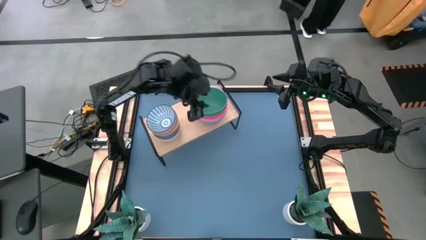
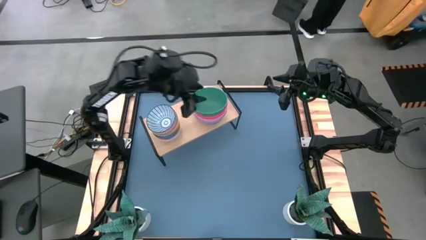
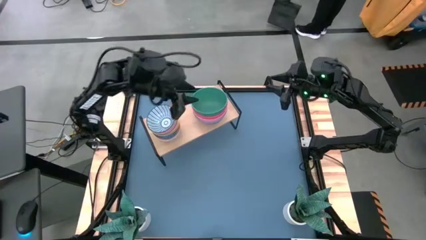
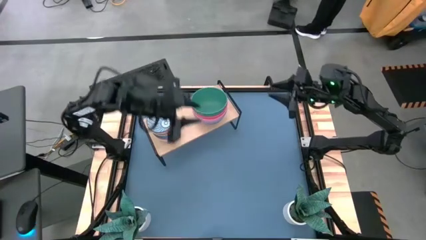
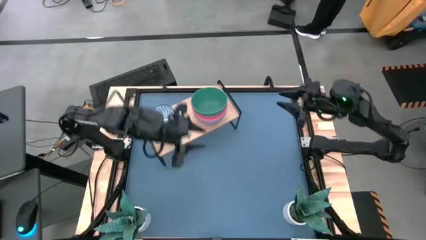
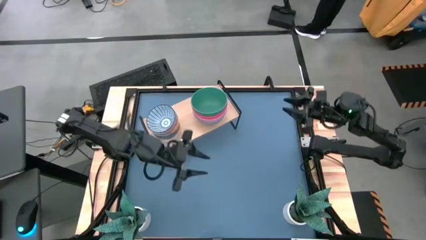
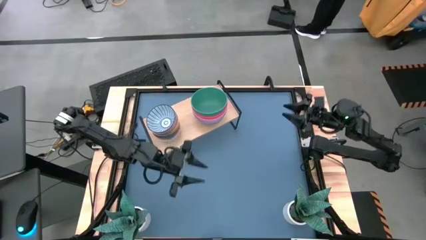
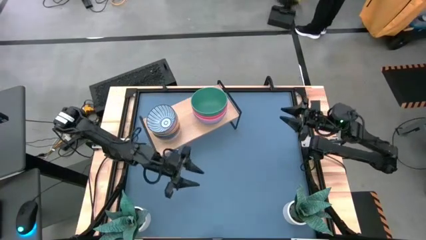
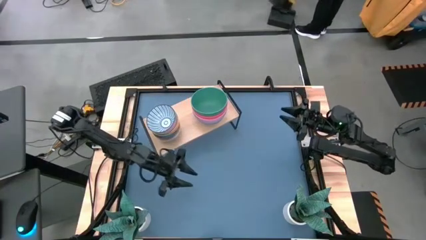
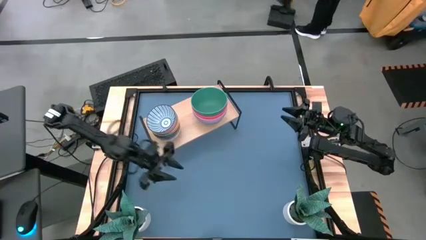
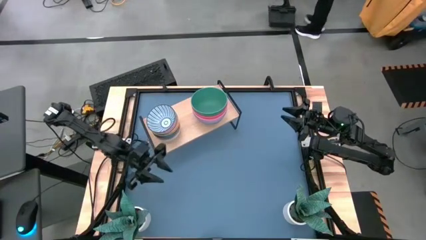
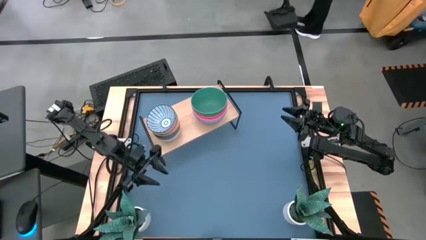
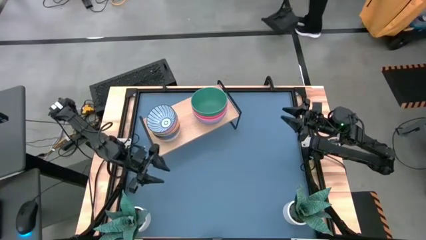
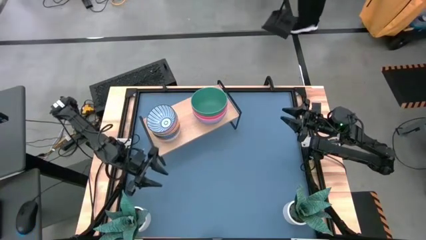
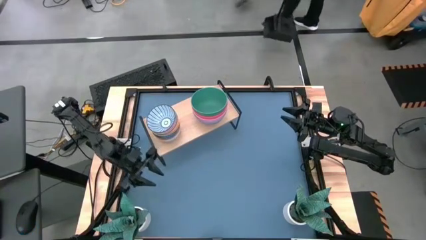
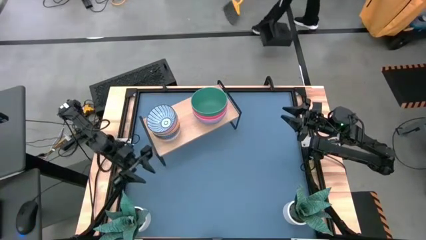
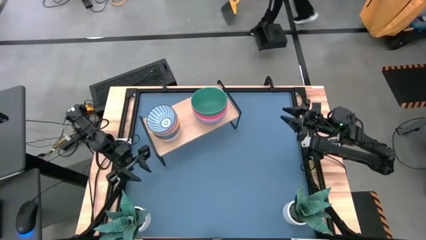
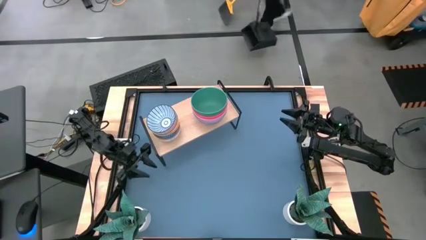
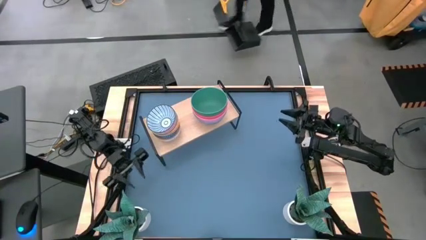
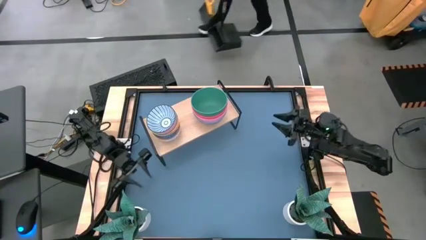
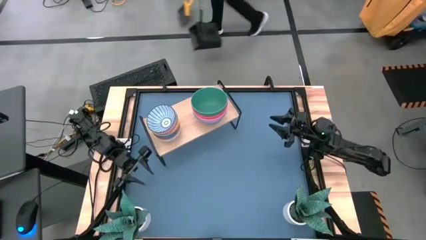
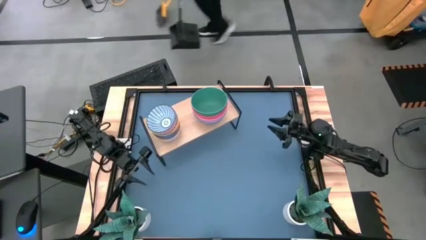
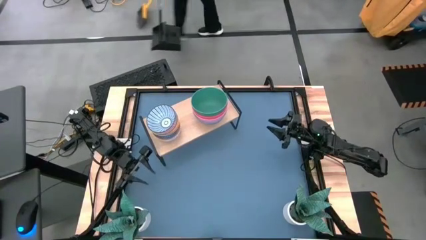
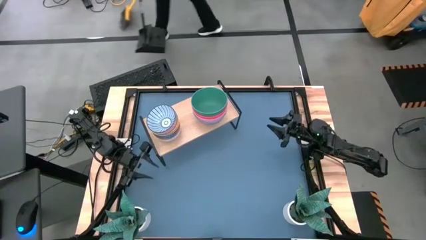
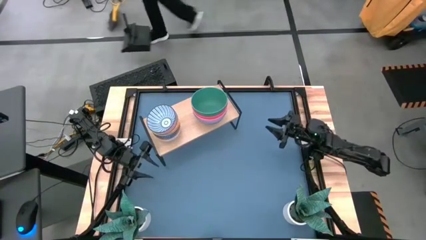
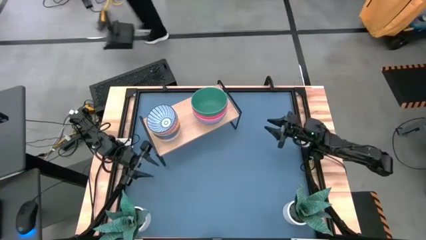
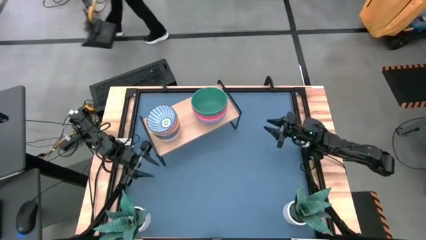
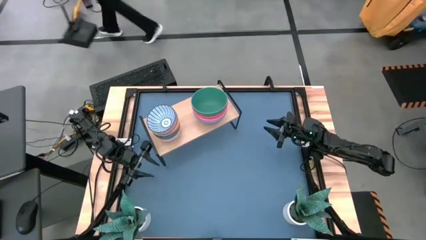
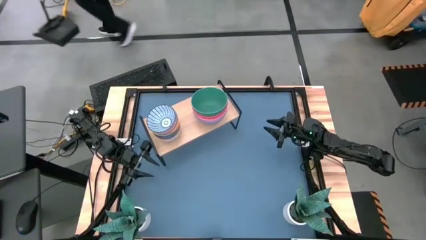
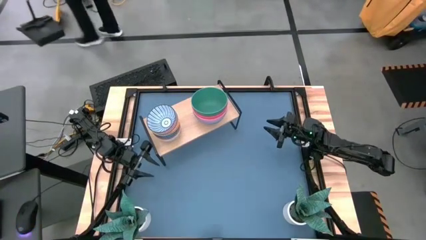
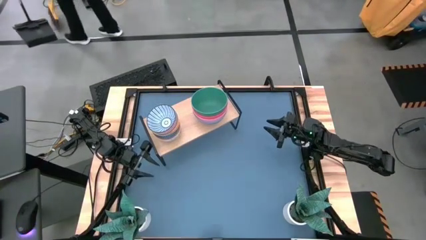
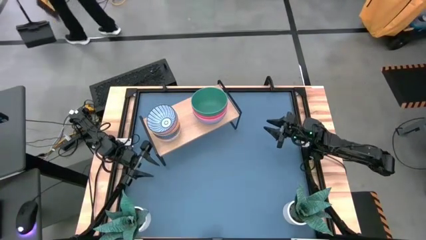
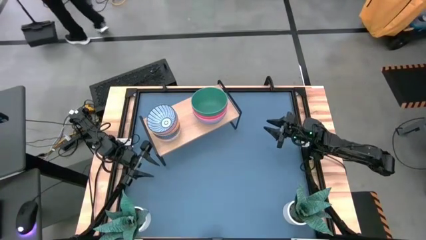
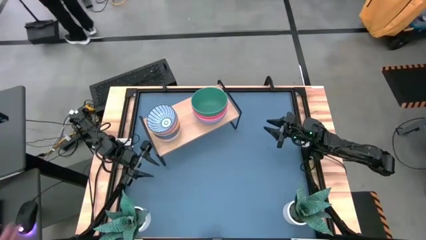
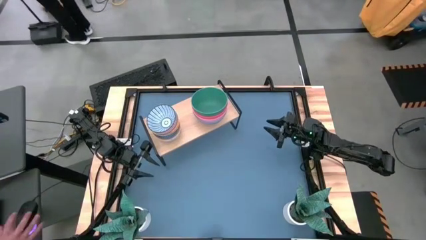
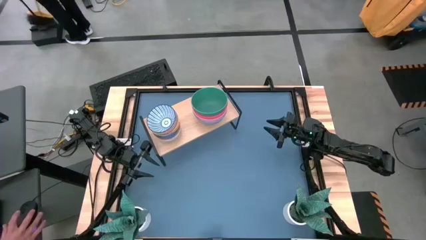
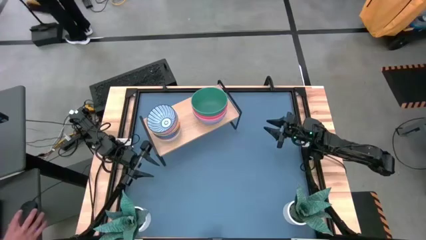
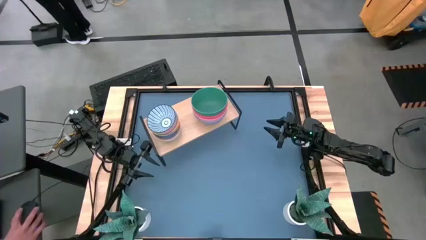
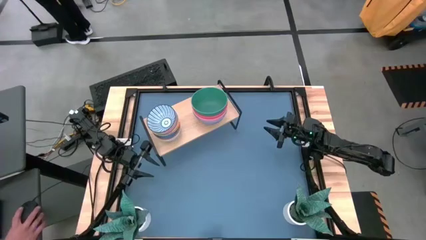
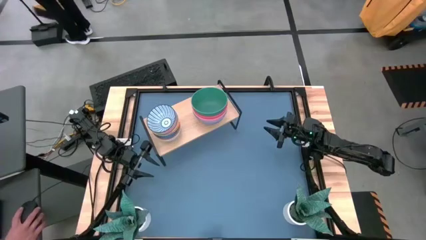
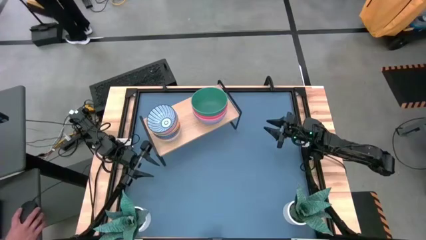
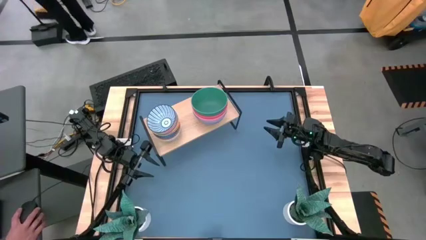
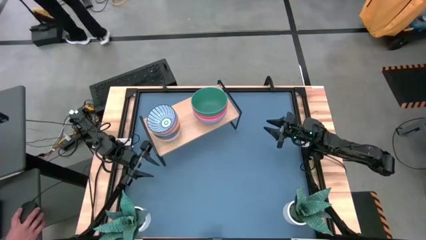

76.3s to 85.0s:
Task: Place and stack bowls onto a shelf
Return to Home Position

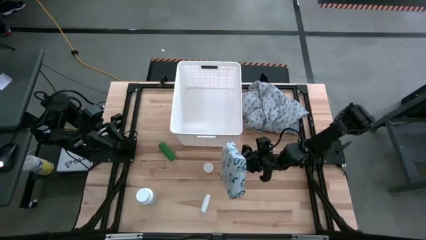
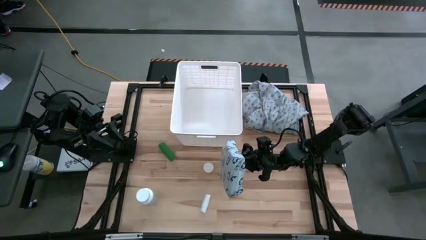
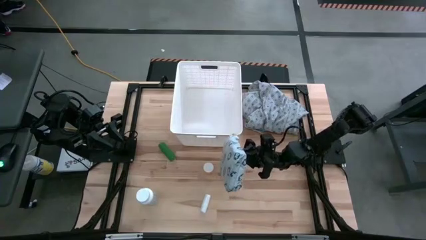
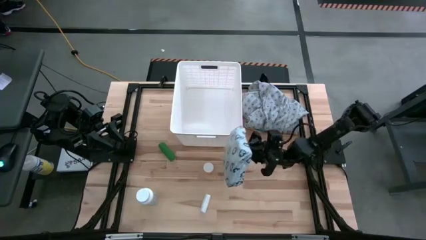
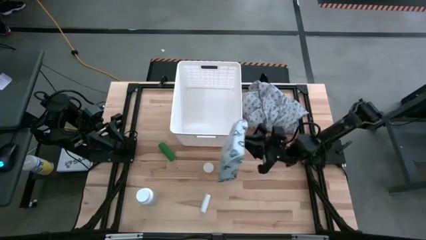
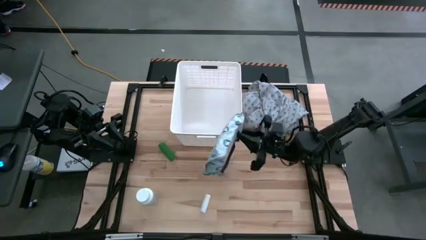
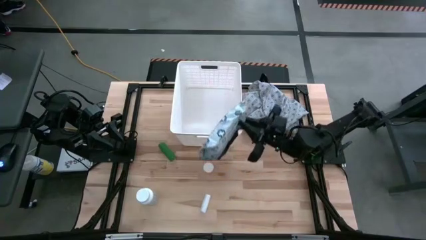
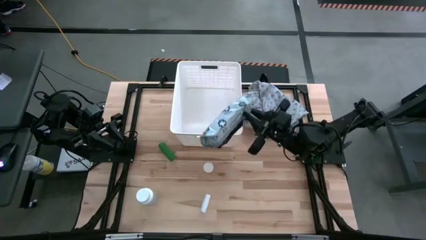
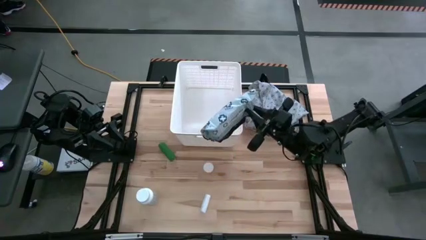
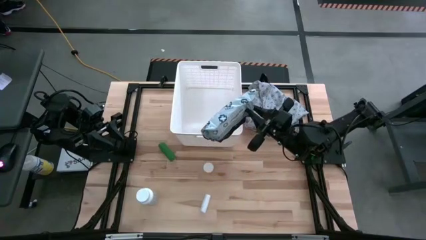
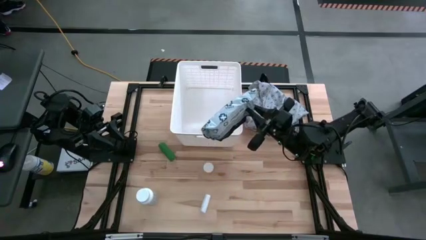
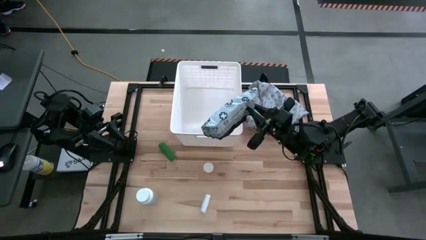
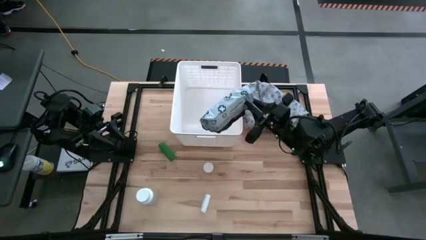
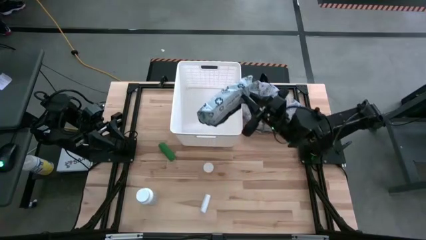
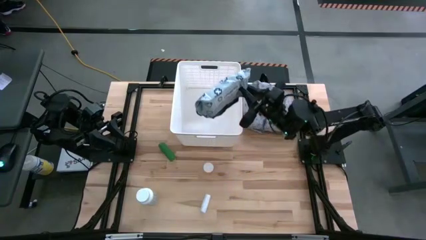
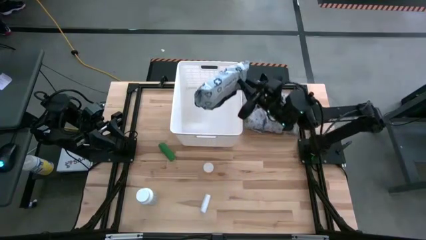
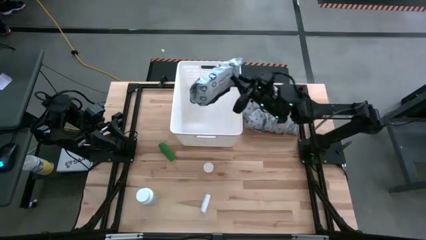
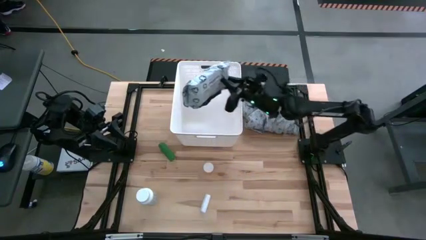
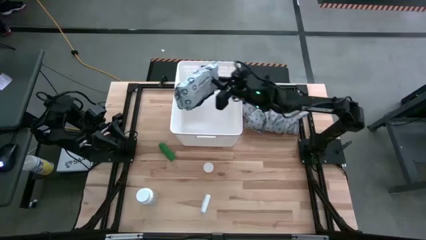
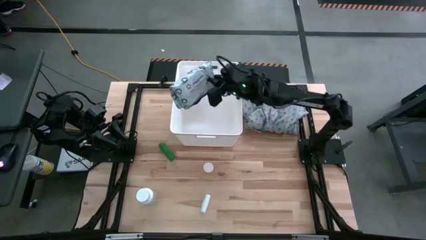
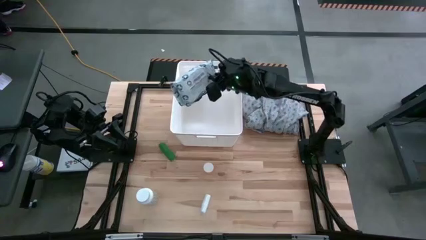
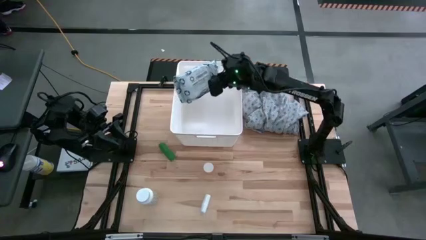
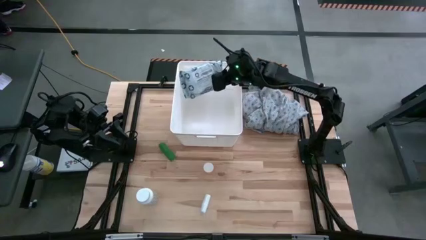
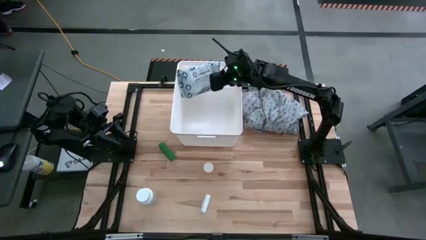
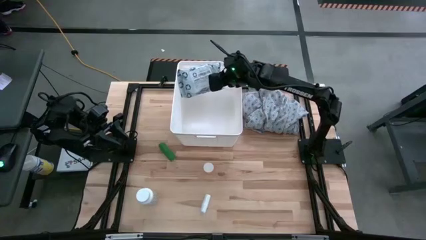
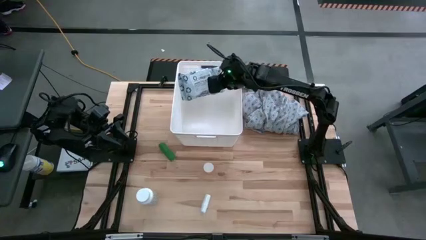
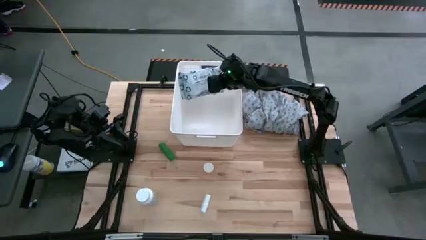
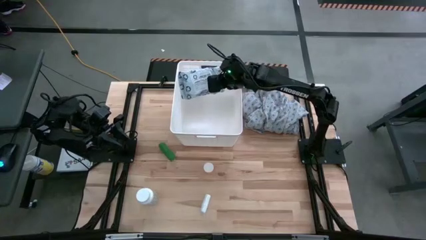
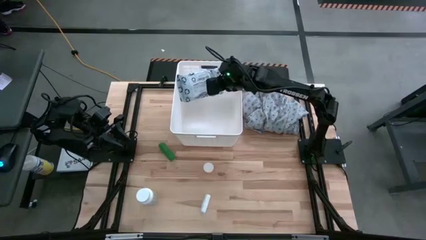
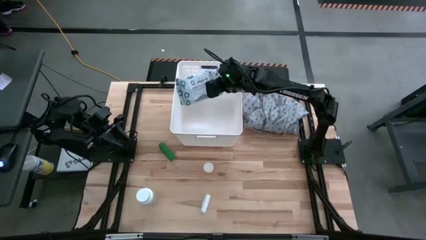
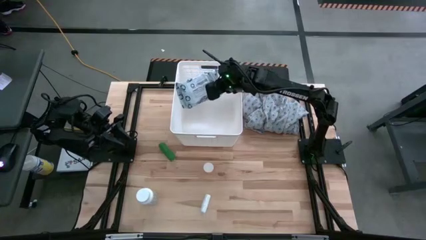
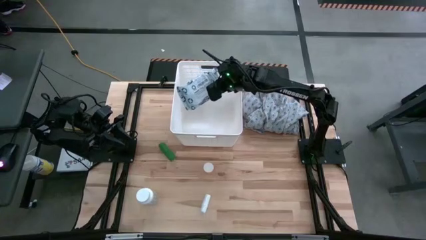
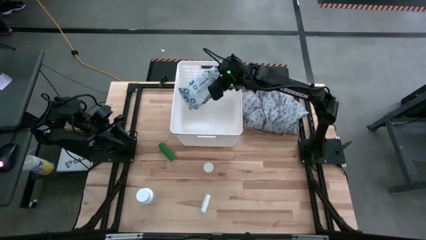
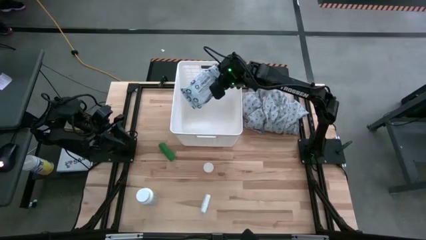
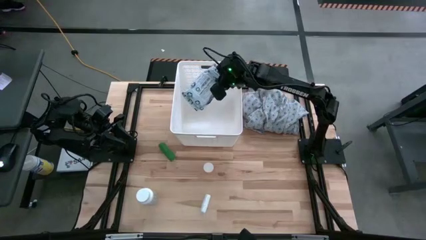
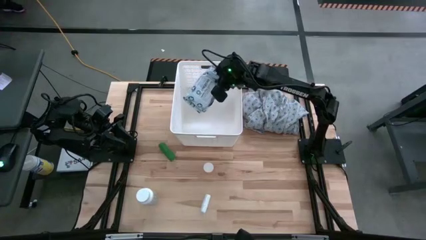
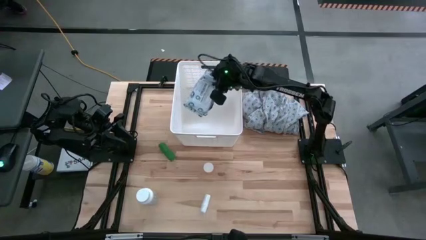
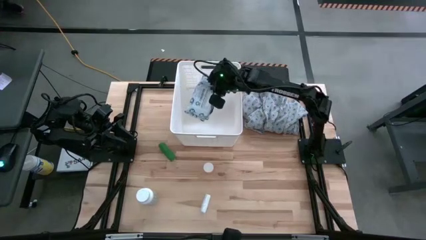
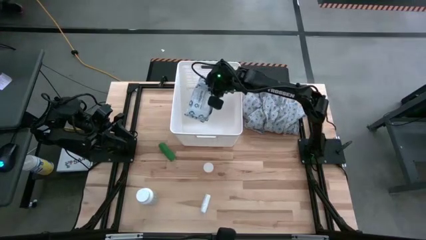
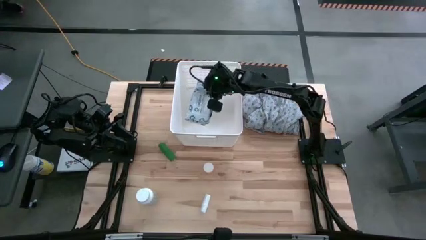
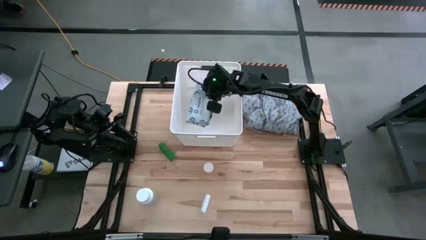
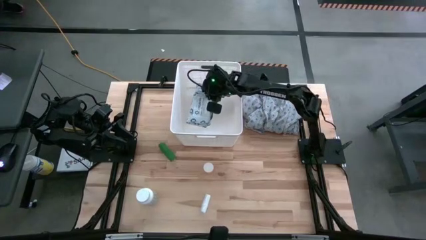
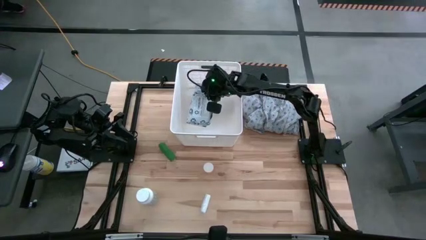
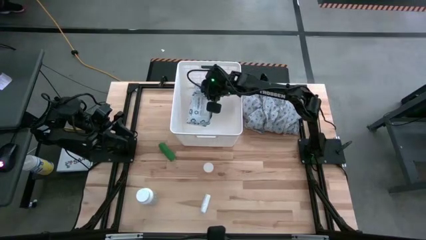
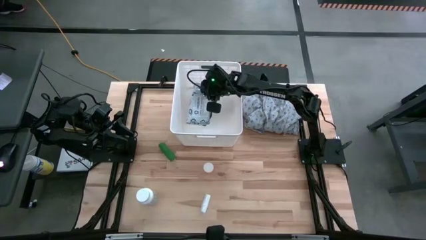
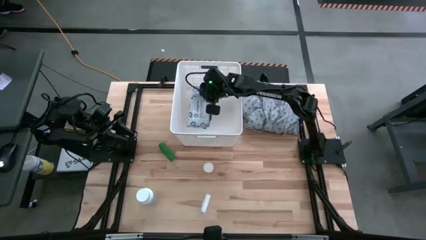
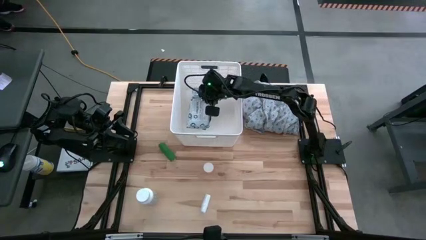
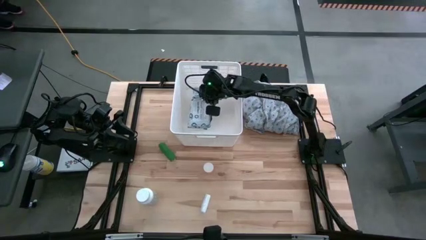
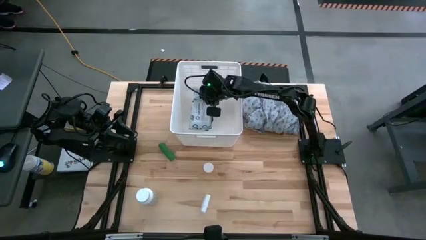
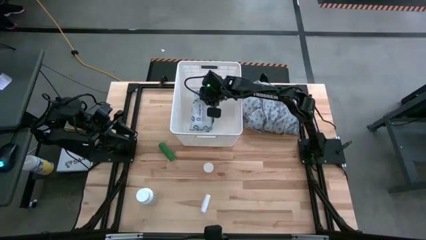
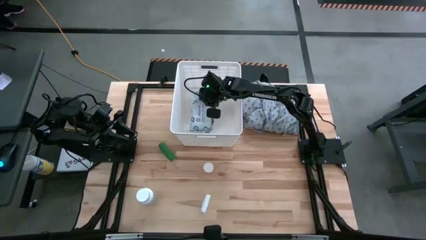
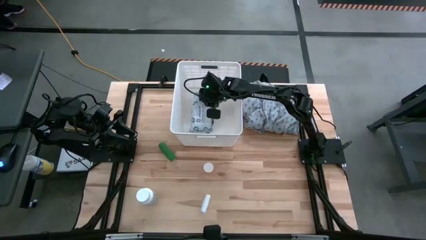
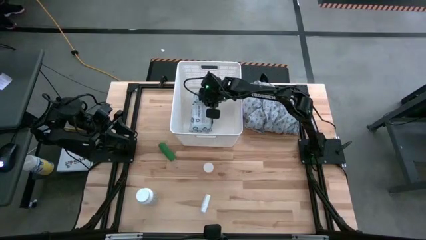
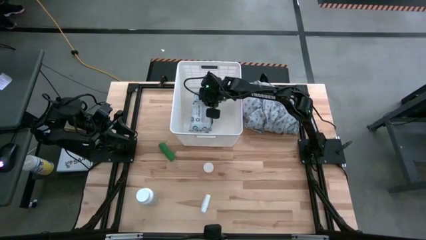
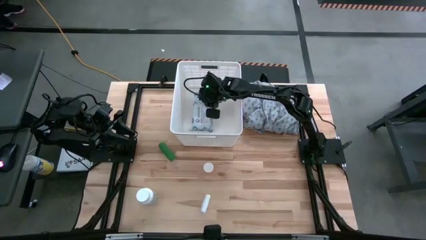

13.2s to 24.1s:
Task: Pick & place medical supplies in basket/bin
Put the mailer bag into the white laundry organizer
